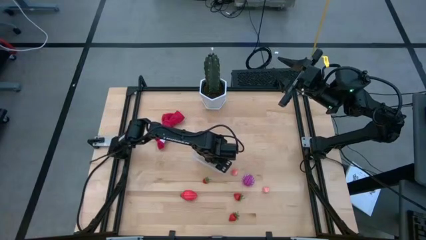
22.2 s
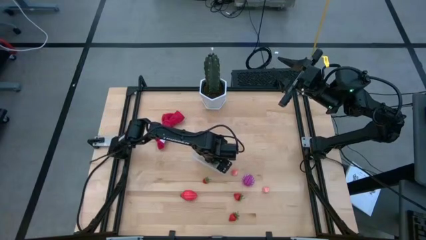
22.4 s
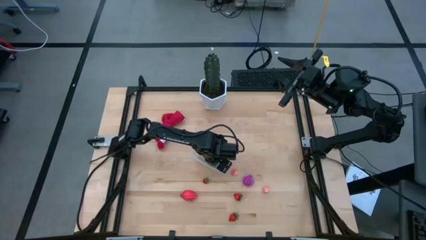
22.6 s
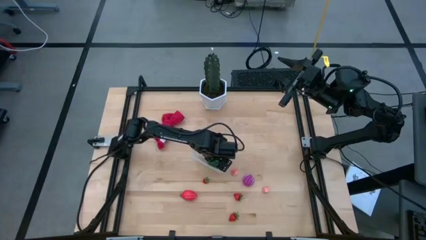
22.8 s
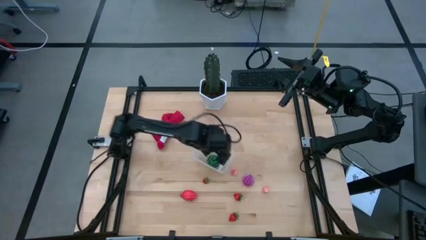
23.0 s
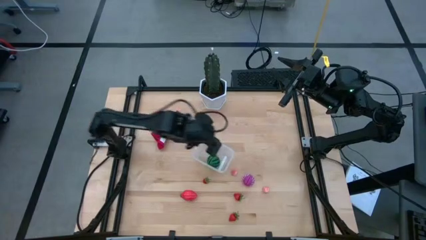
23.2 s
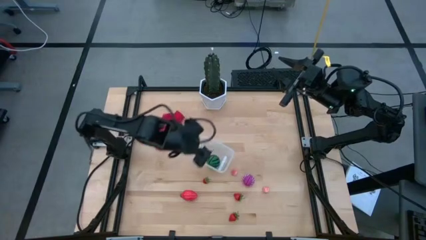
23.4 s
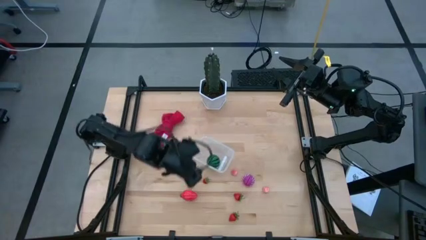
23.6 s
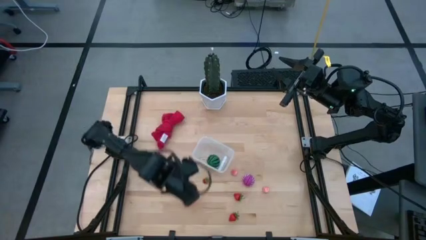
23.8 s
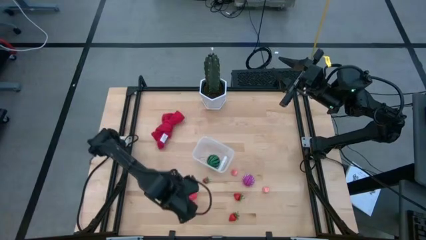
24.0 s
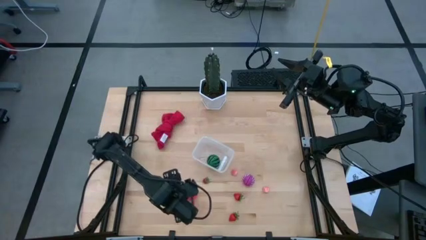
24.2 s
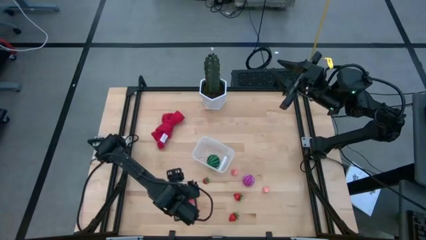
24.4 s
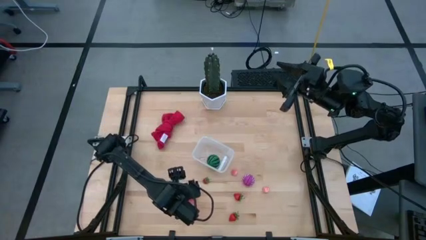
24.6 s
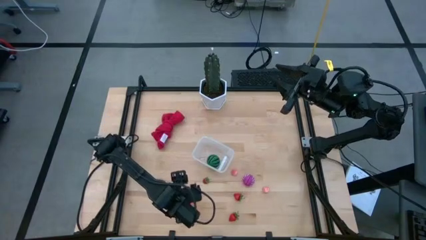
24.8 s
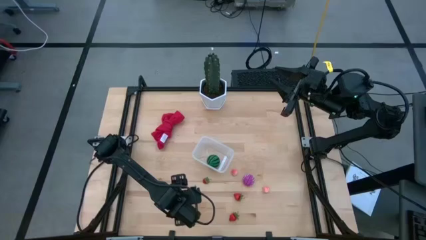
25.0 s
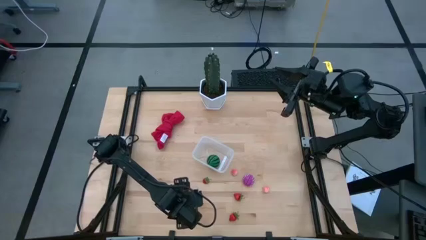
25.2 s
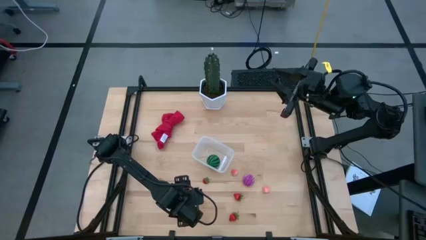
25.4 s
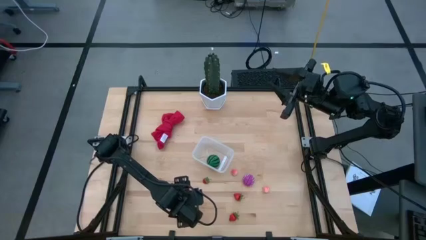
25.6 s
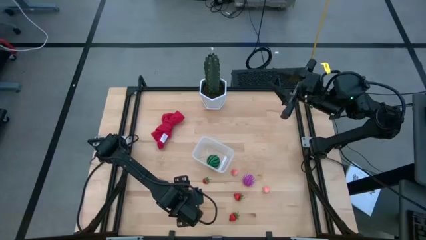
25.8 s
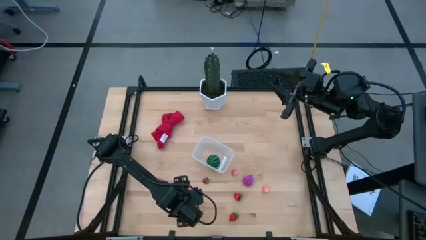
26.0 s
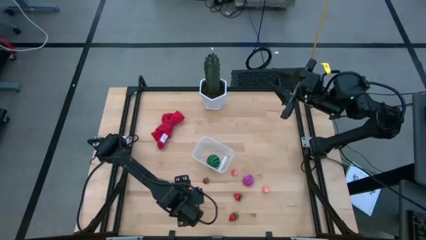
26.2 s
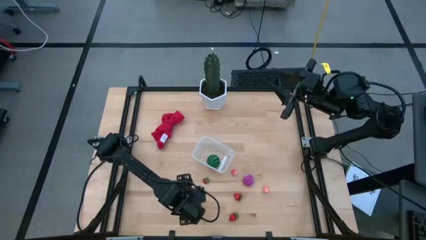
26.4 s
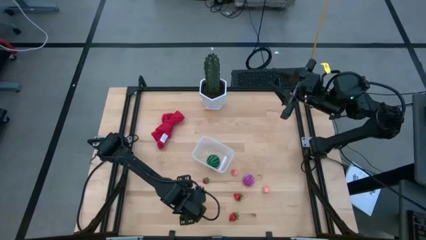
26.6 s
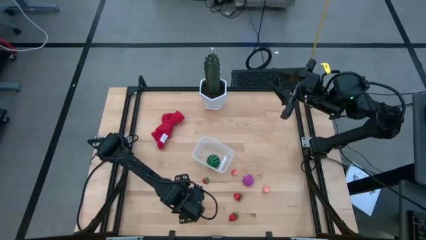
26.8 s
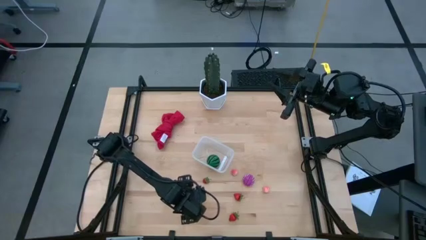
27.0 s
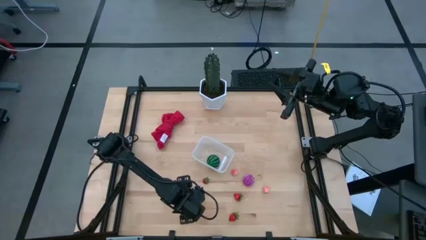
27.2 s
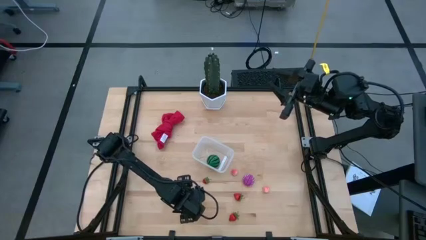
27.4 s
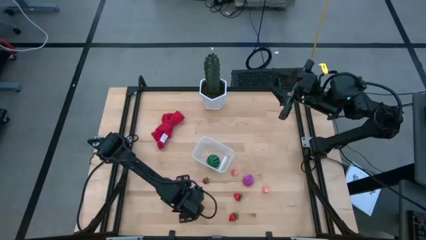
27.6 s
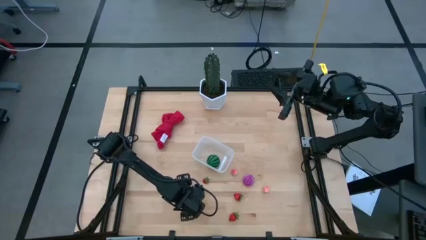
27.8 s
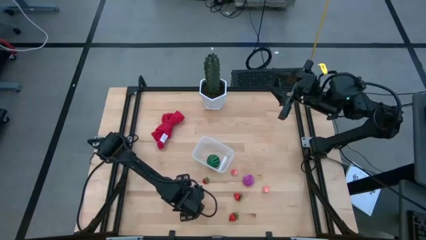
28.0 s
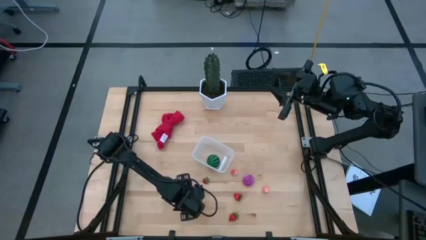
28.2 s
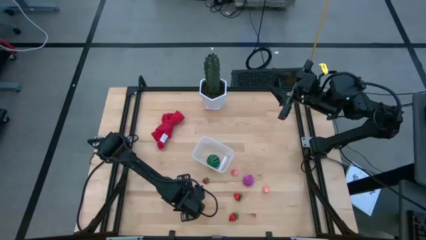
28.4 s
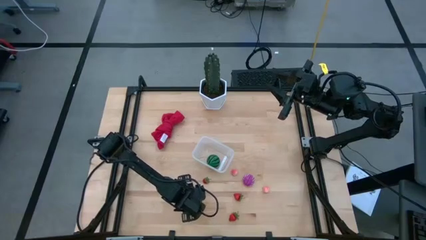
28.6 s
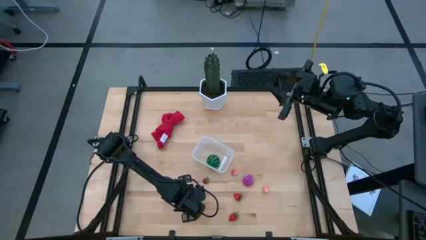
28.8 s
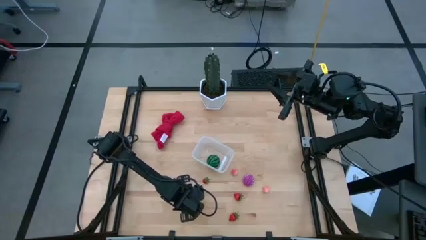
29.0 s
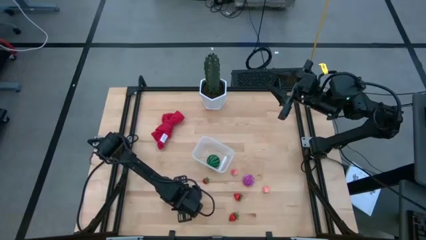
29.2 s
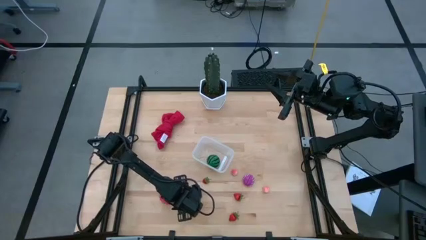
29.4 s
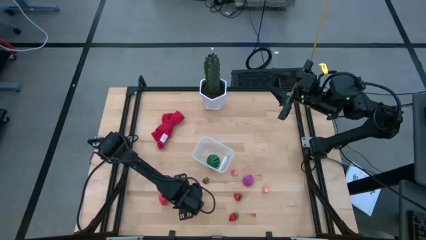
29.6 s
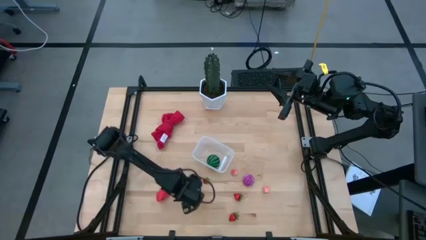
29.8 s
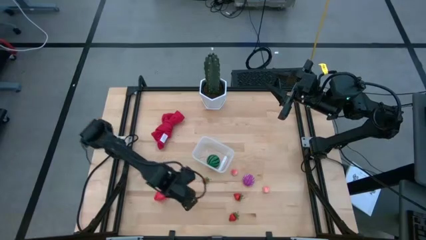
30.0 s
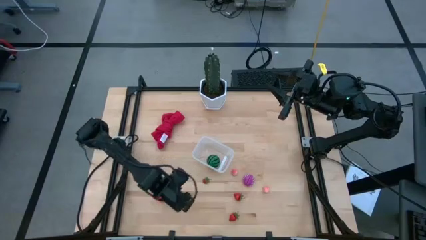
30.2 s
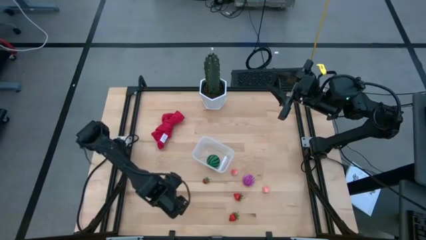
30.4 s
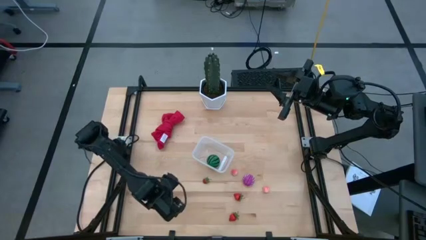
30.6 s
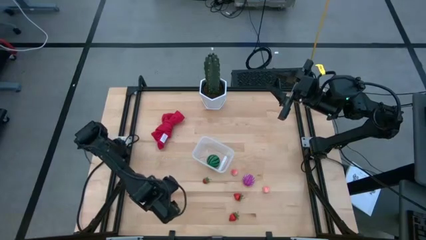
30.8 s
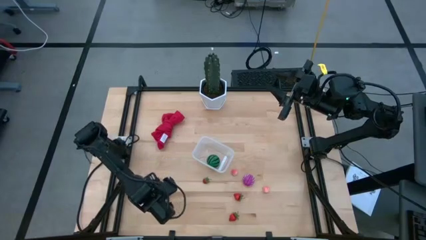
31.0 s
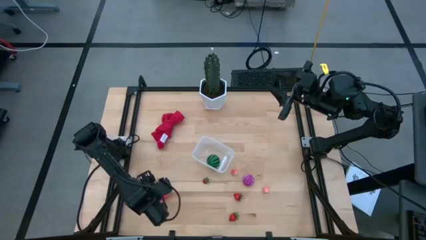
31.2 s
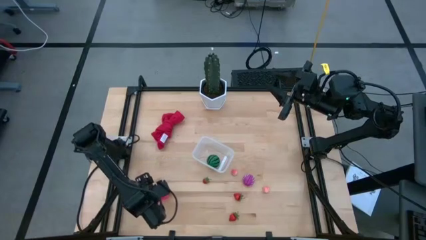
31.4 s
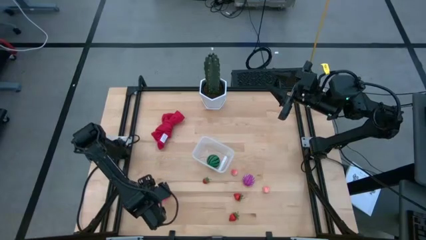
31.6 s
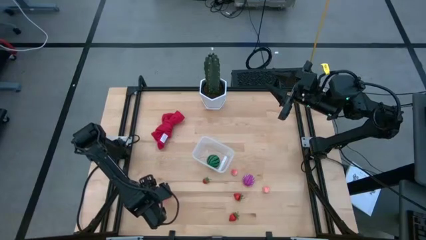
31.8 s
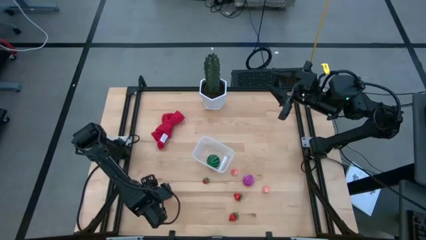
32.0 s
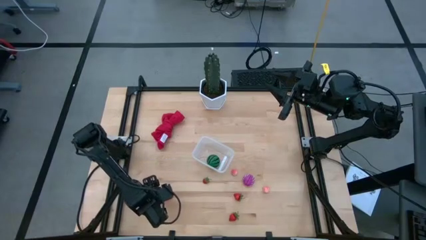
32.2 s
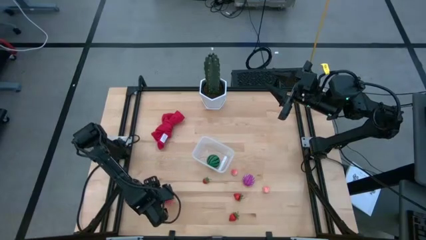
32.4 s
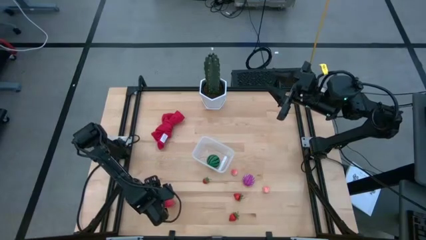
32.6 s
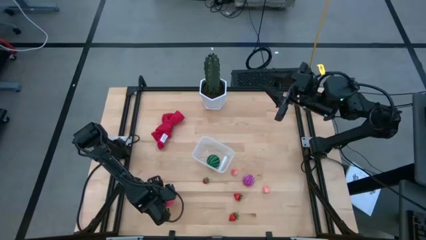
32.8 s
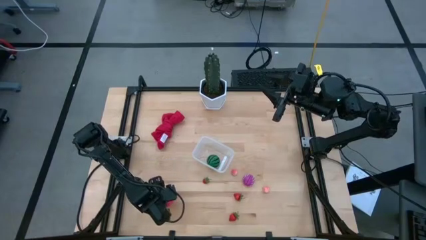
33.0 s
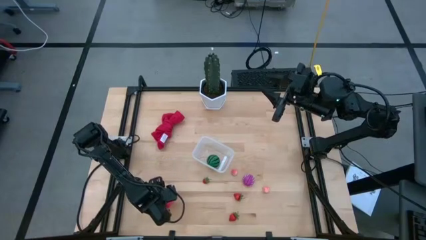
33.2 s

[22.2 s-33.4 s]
Task: Pick and placing Produce into tupperware
Put the pink dragon fruit into the transparent container

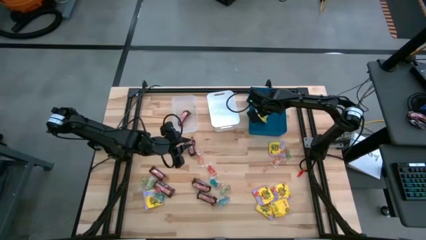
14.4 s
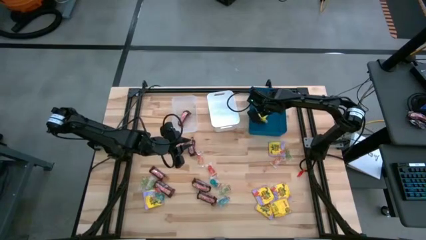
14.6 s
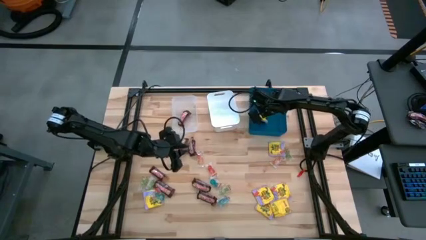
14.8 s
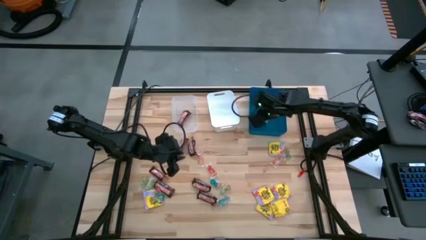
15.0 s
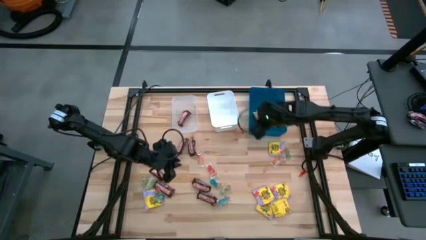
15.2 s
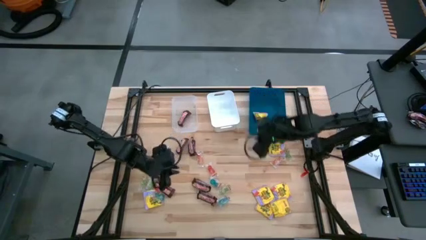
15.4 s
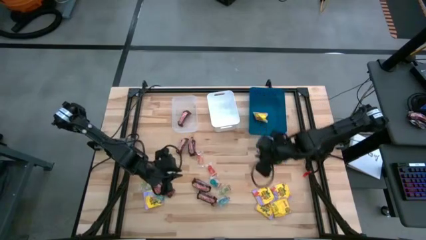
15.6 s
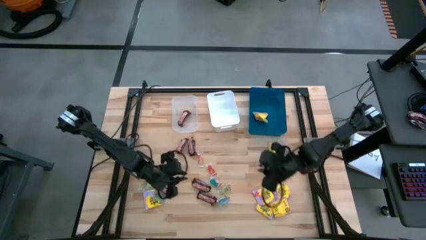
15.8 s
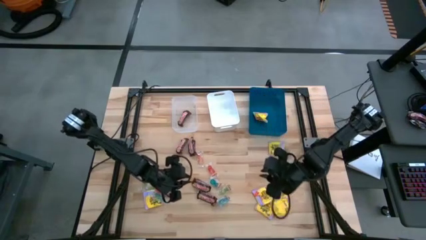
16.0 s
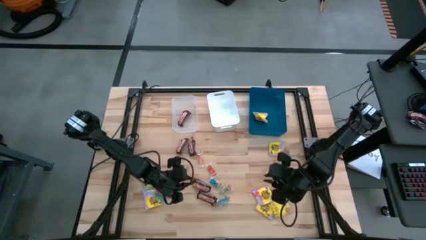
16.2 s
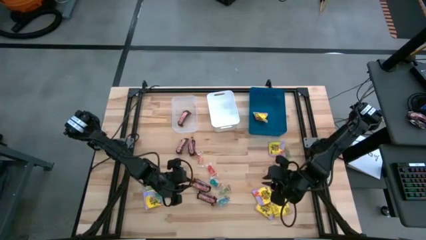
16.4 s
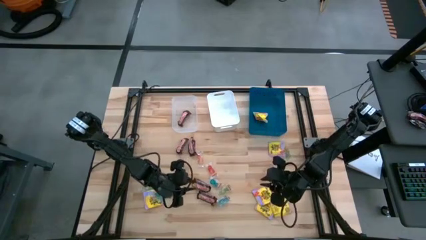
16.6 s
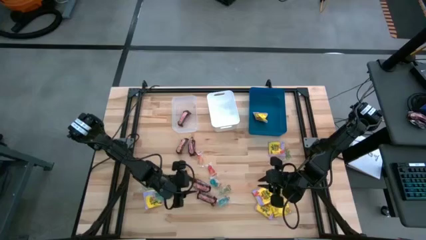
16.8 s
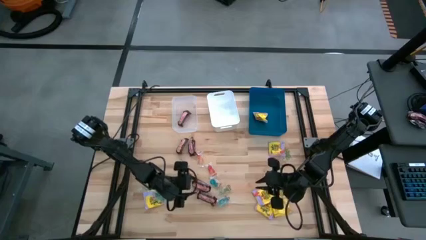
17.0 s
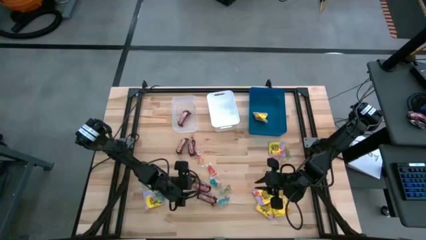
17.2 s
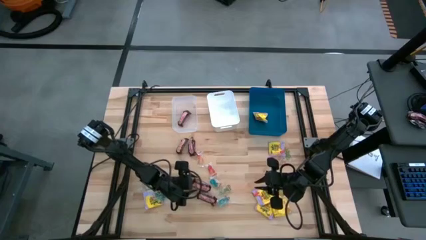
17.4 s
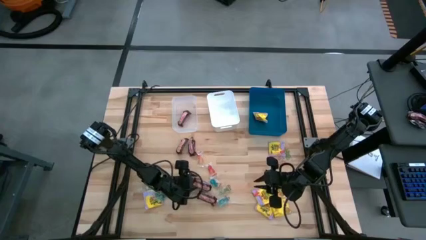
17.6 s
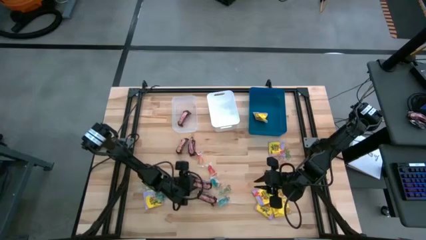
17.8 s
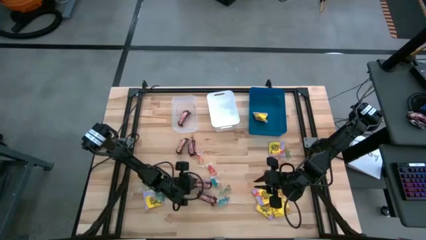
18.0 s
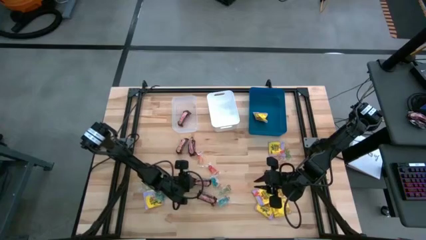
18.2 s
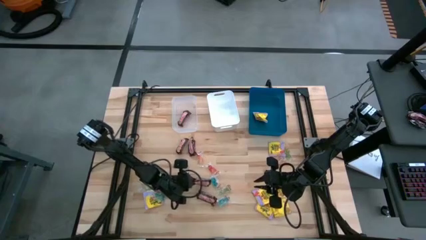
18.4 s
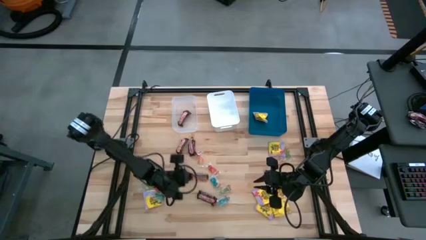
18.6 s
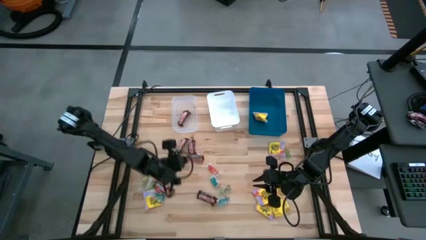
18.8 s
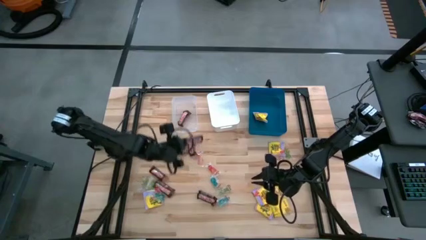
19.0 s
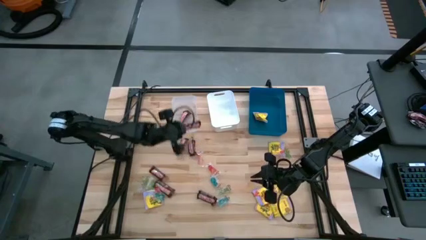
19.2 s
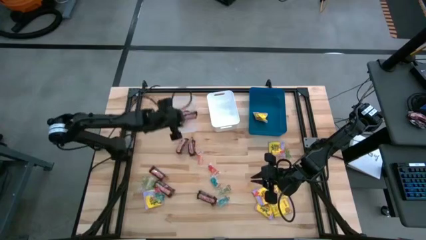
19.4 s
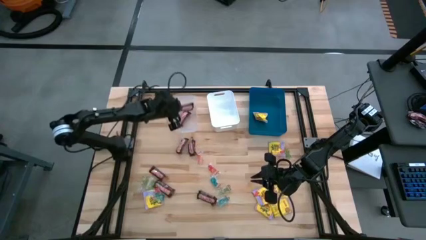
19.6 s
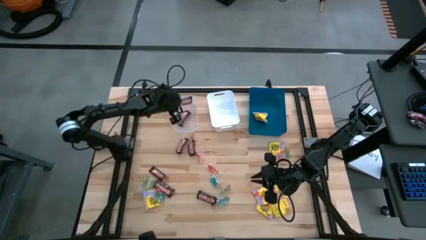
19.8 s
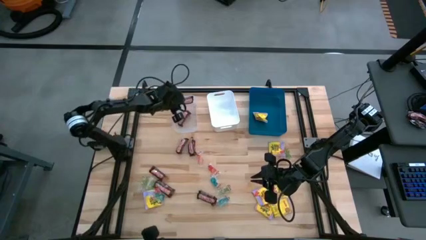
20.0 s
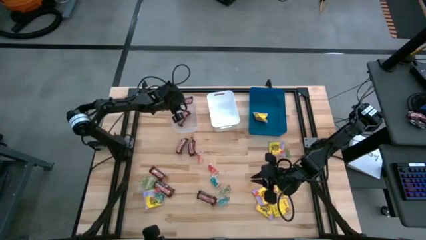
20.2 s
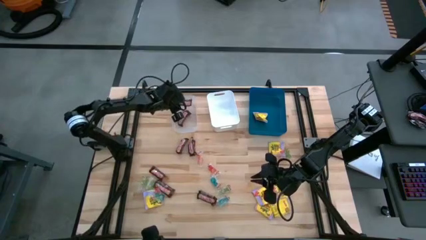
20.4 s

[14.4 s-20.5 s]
Task: Sort candy
Put the bottom center brown candy bar into the transparent bin
